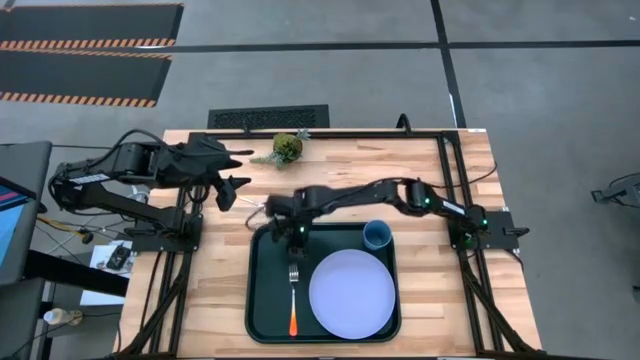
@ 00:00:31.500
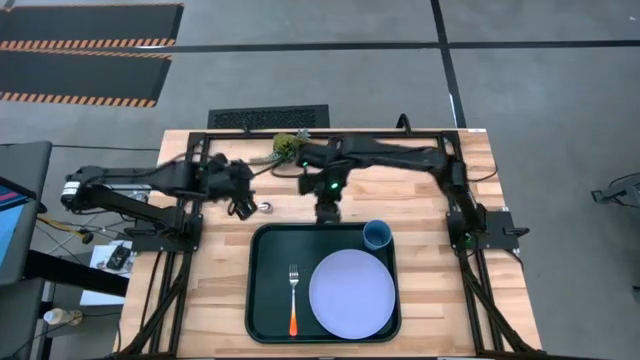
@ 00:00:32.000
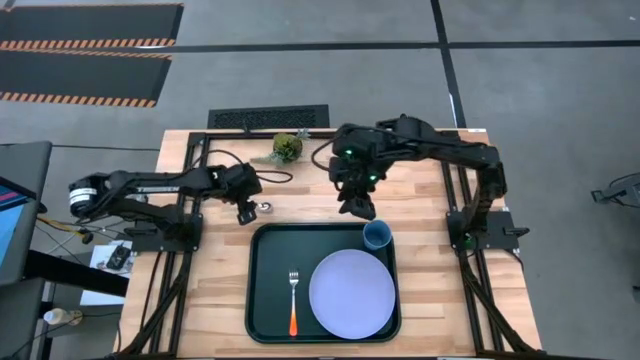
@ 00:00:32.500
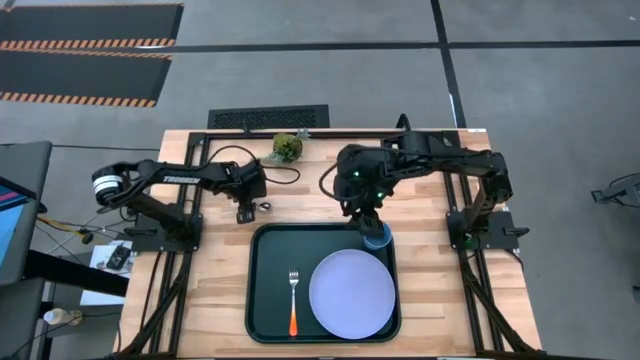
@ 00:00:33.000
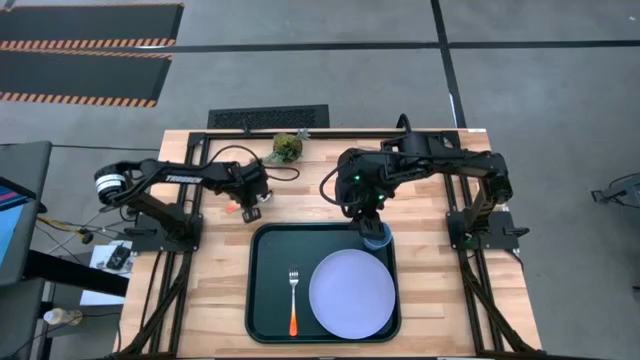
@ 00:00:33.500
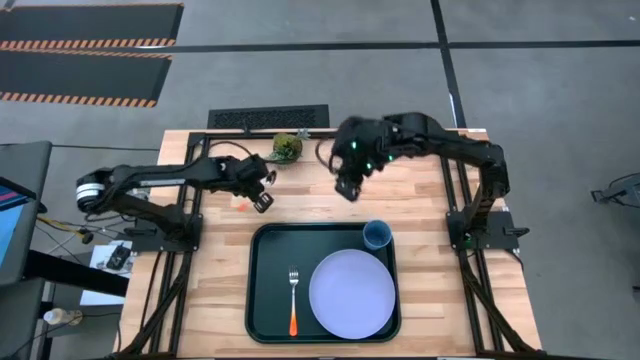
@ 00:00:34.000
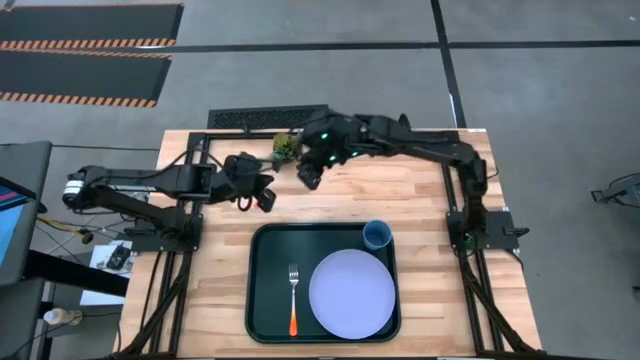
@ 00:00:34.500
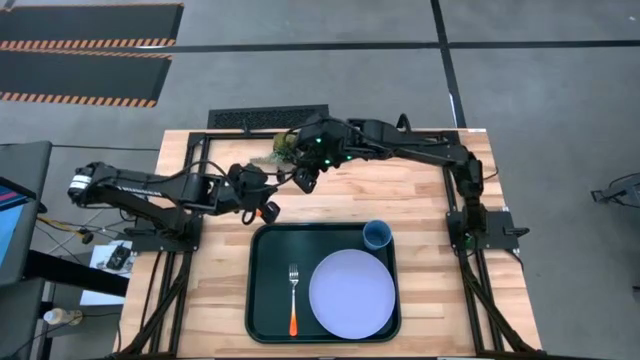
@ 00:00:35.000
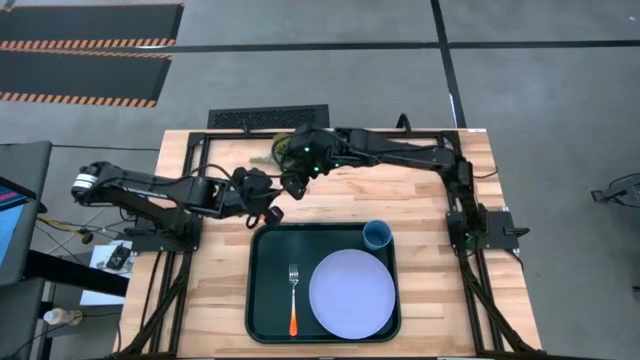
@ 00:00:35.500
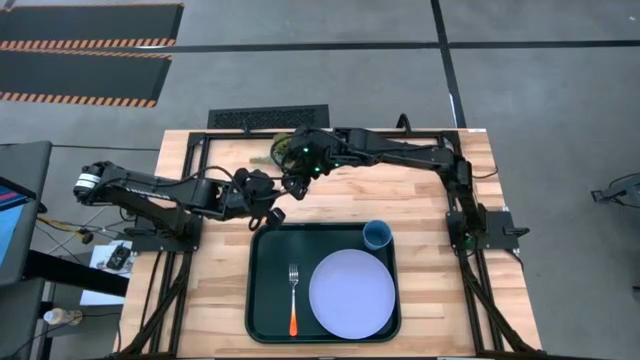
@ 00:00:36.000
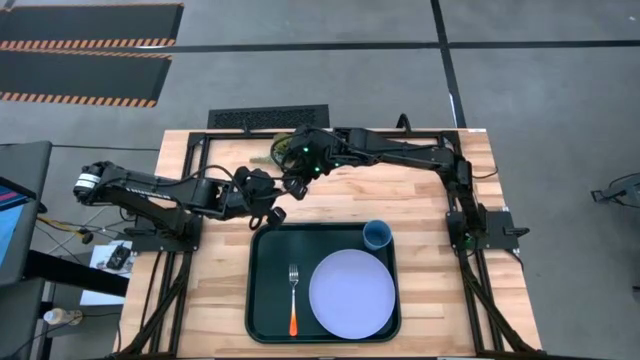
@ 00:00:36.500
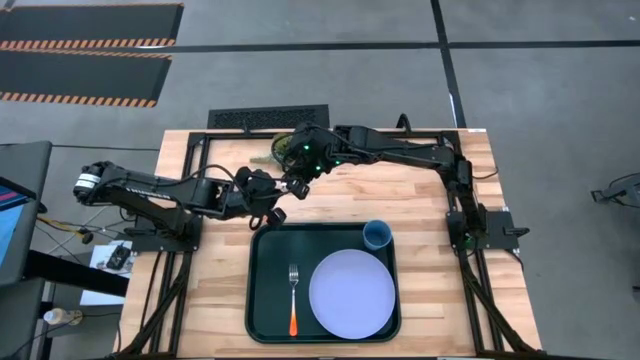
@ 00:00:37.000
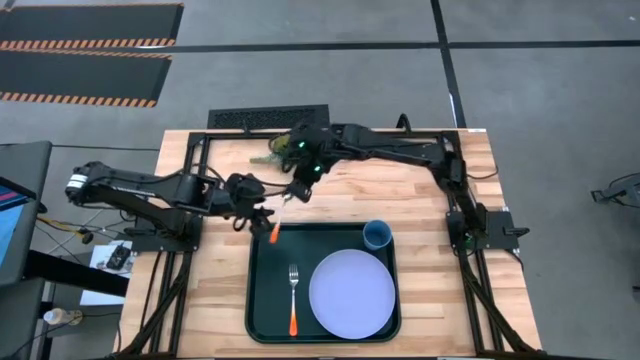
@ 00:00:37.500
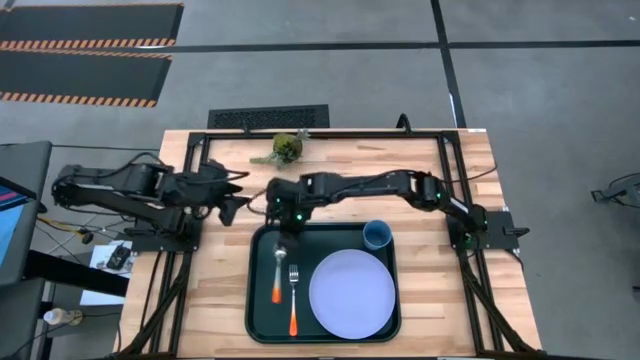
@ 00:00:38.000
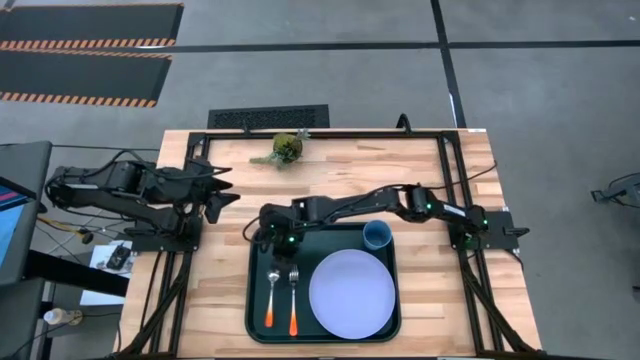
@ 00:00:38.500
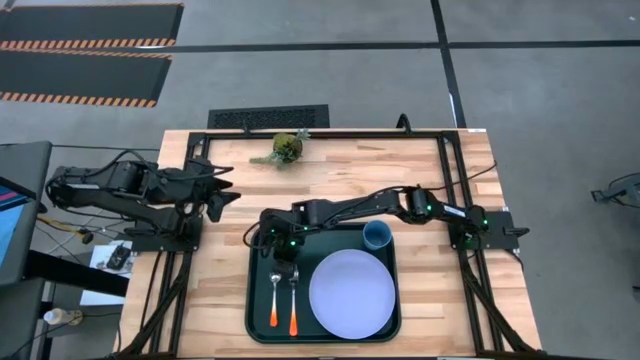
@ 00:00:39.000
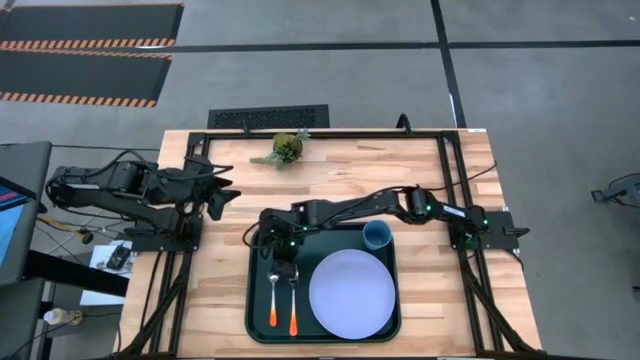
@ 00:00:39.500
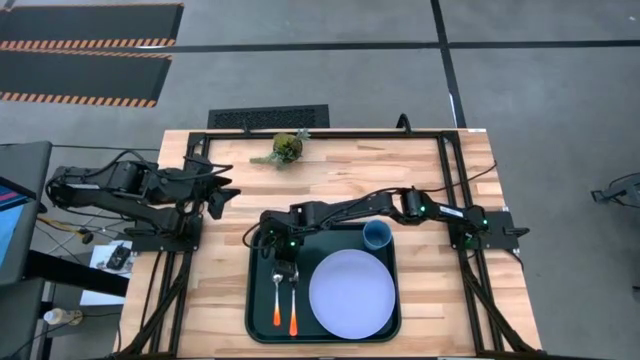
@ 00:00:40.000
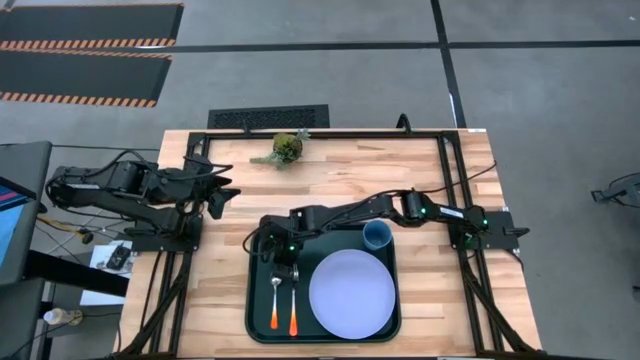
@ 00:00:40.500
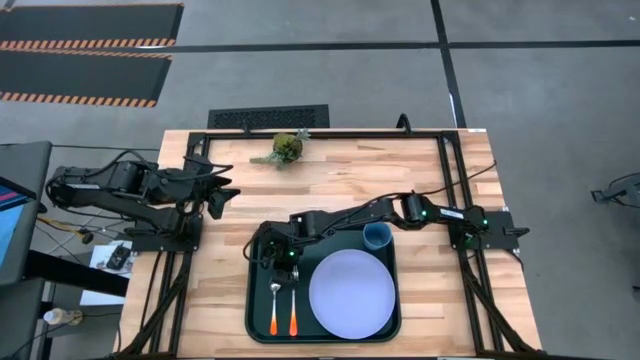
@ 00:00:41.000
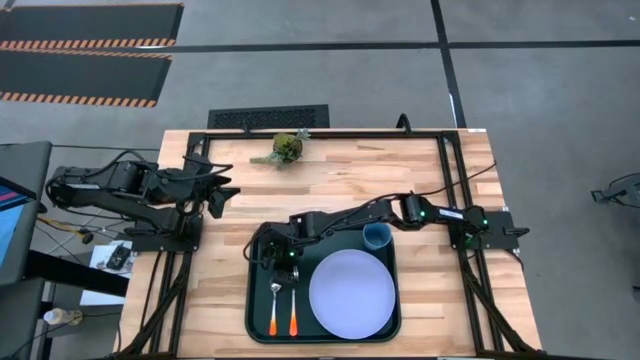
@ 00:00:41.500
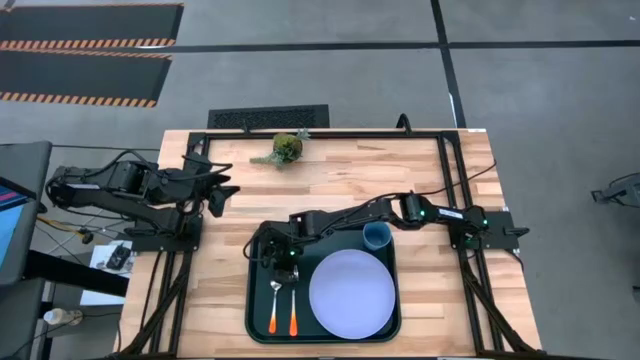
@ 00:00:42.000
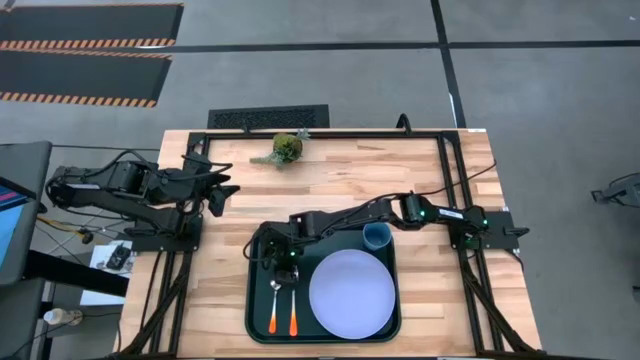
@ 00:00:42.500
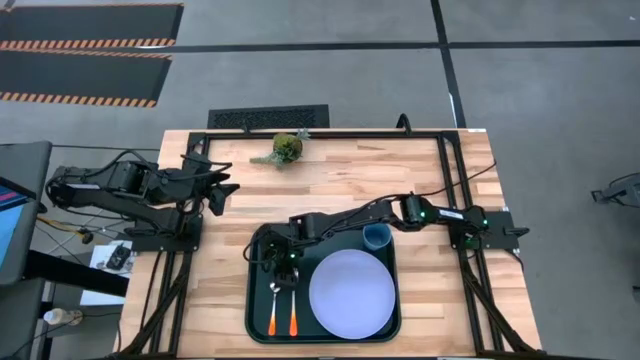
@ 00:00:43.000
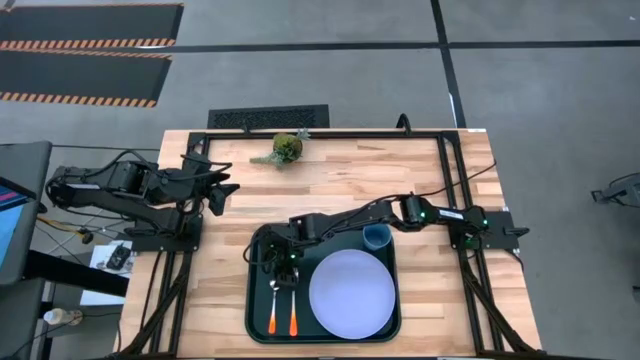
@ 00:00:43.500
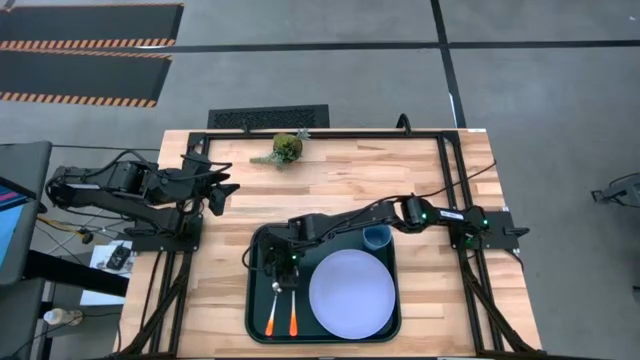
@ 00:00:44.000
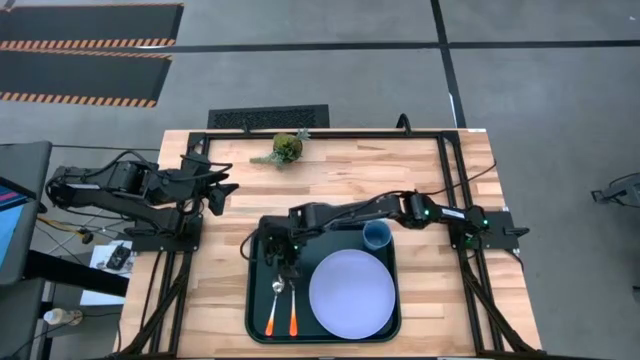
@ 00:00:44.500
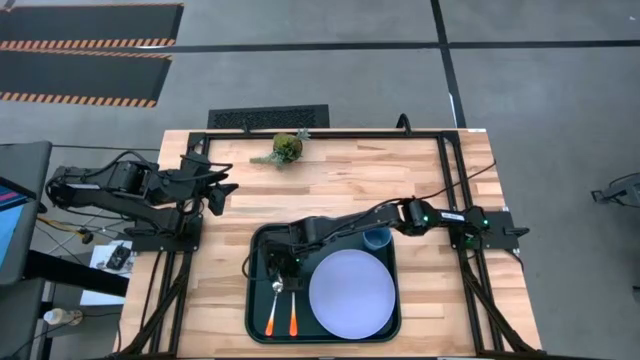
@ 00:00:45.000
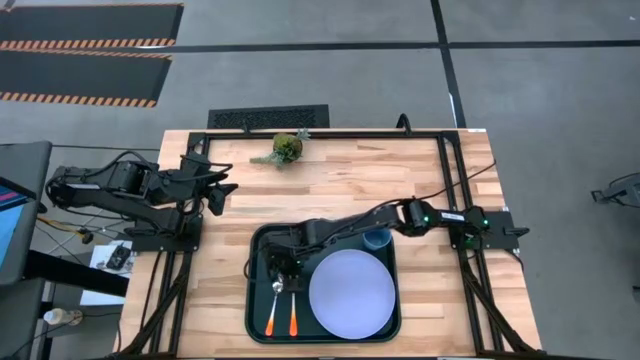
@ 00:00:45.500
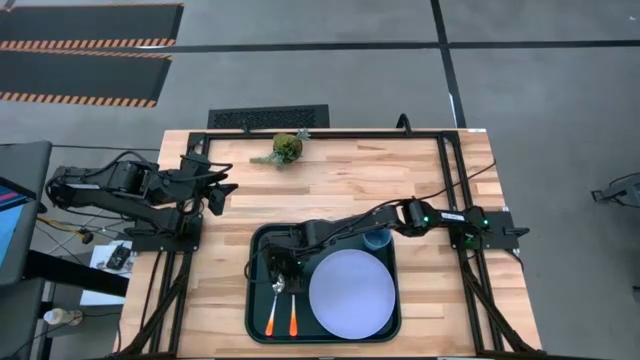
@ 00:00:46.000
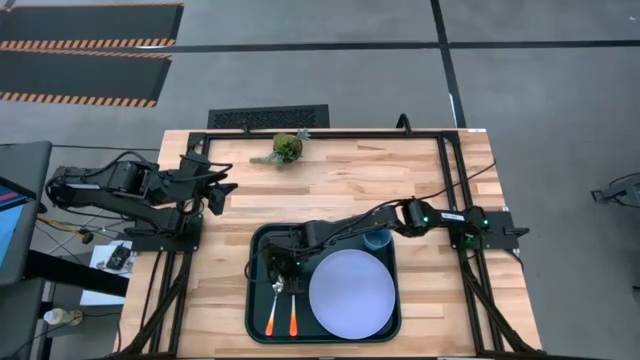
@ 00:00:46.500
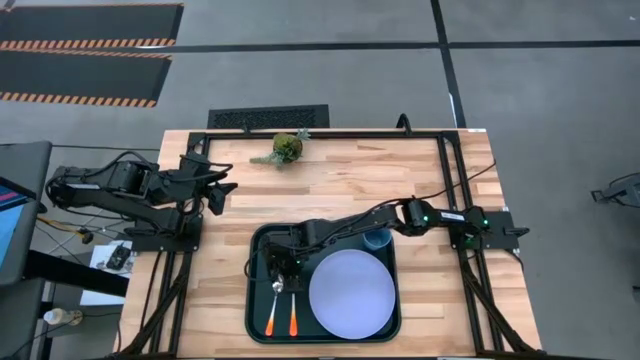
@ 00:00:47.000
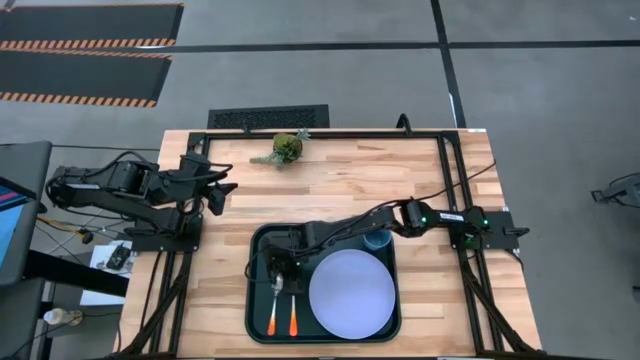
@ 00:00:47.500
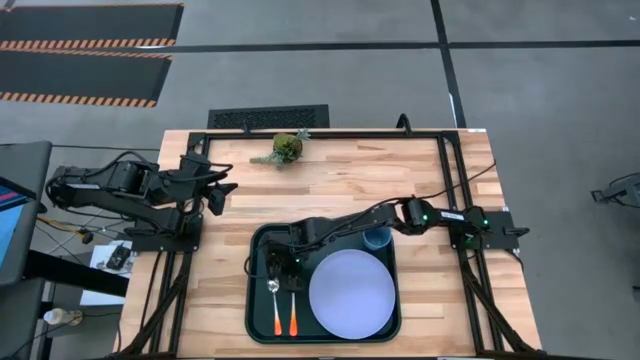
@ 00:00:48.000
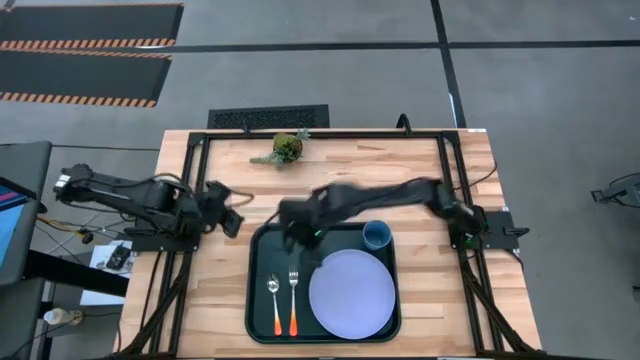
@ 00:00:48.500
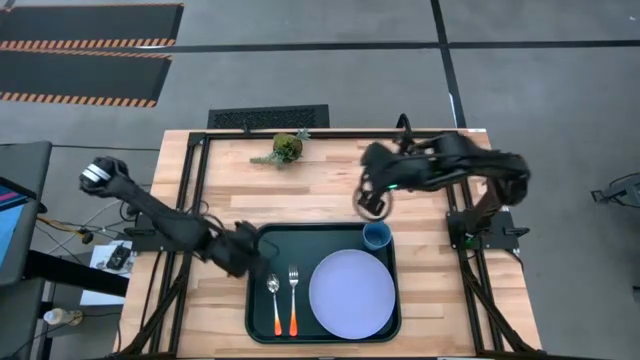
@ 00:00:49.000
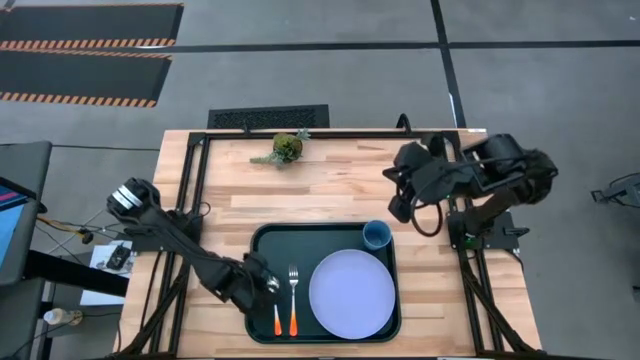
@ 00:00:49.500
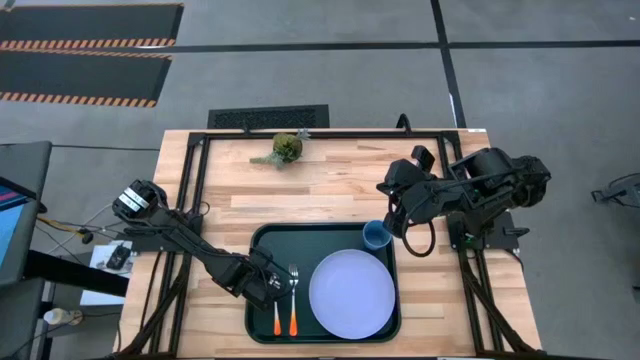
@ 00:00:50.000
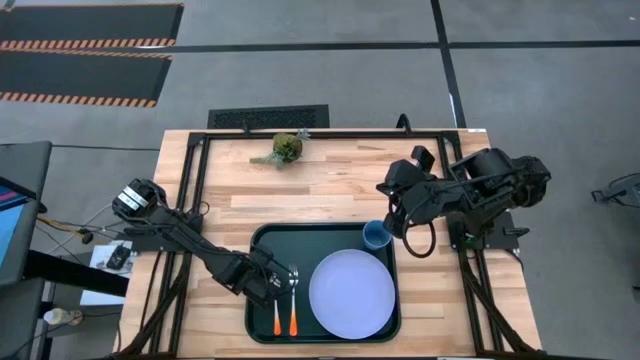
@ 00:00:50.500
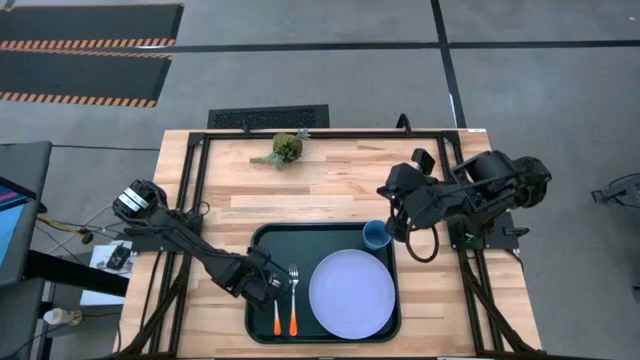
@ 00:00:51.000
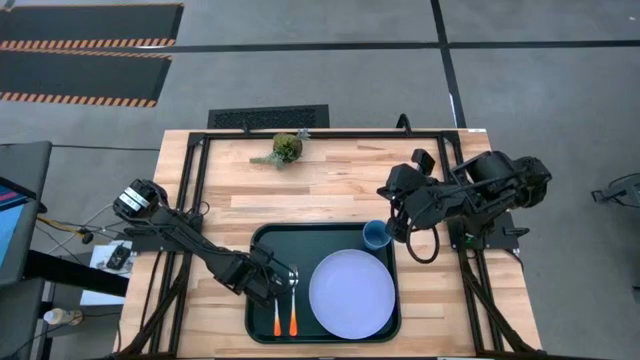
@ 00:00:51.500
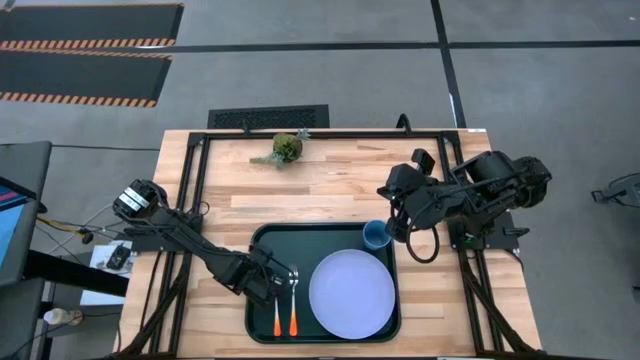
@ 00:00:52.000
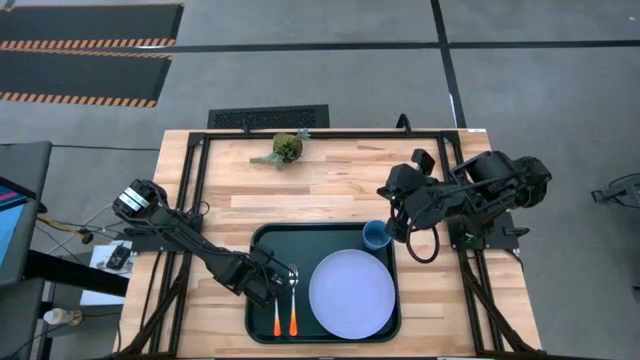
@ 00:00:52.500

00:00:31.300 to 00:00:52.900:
Task: Pick and place plate/cup/fork/spoon on tray
Put the orange fork on the black tray to the left of the fork
